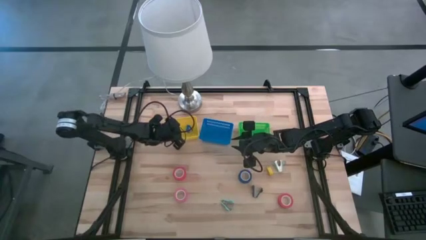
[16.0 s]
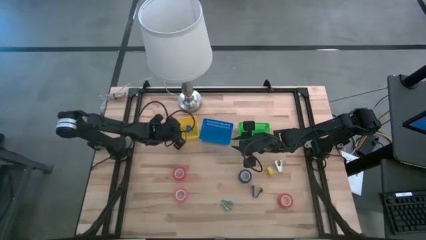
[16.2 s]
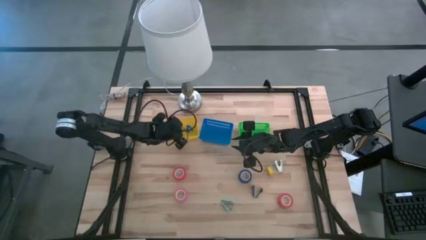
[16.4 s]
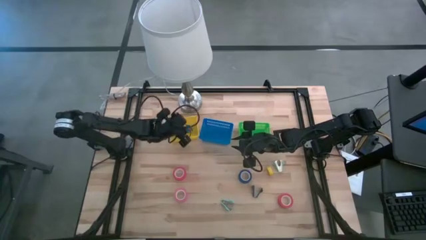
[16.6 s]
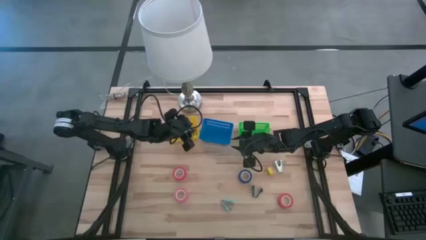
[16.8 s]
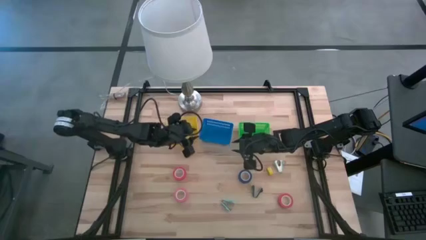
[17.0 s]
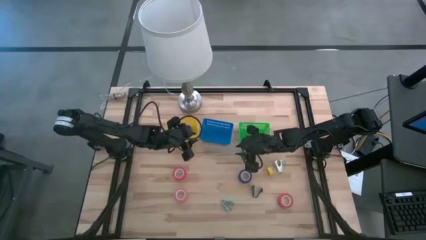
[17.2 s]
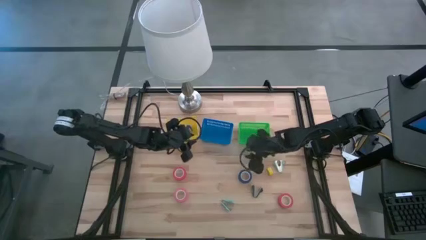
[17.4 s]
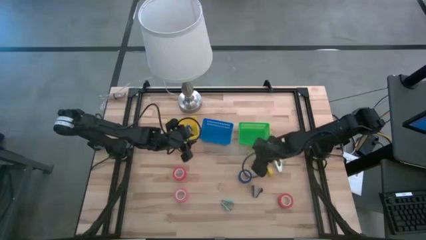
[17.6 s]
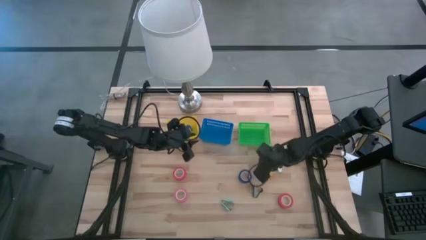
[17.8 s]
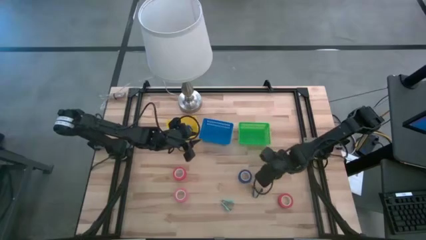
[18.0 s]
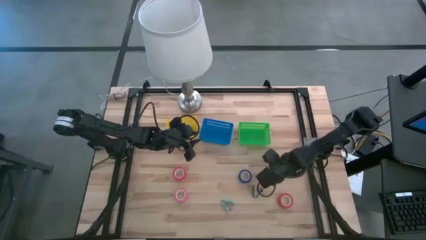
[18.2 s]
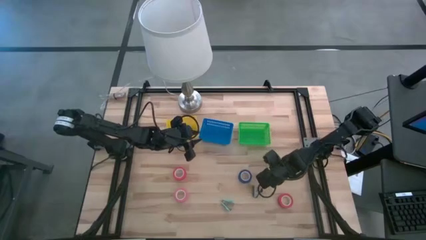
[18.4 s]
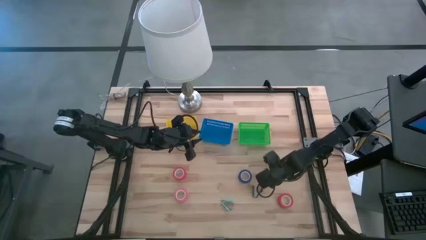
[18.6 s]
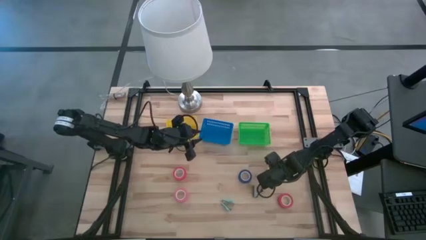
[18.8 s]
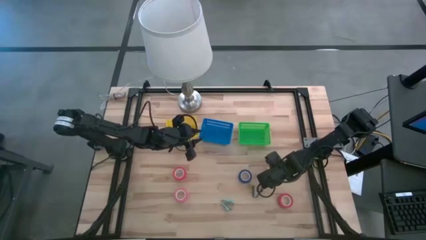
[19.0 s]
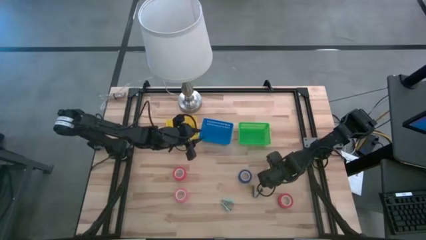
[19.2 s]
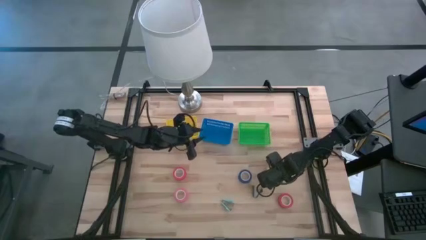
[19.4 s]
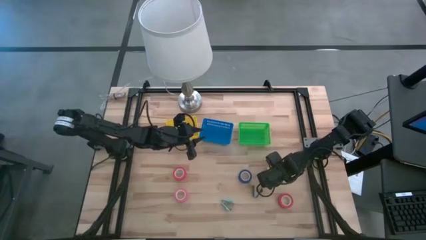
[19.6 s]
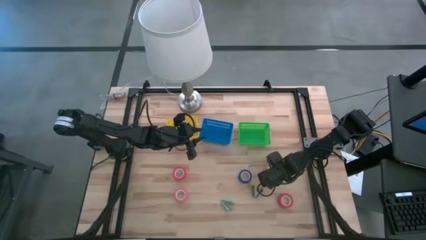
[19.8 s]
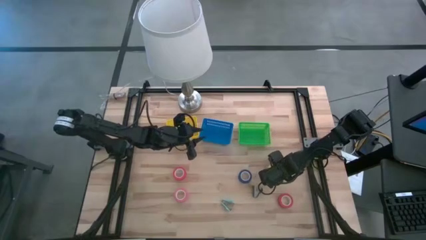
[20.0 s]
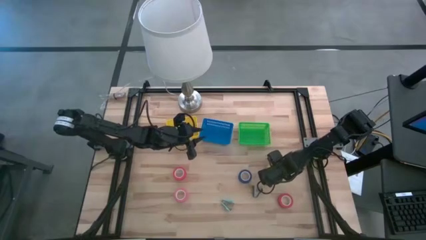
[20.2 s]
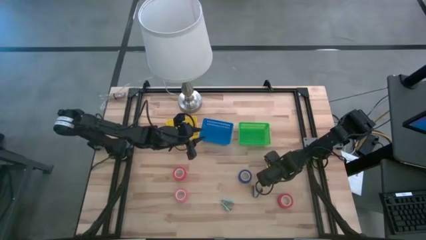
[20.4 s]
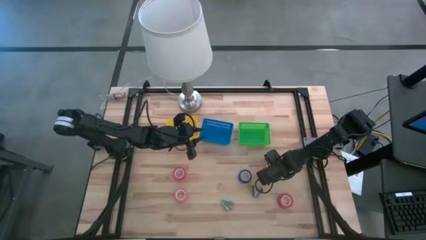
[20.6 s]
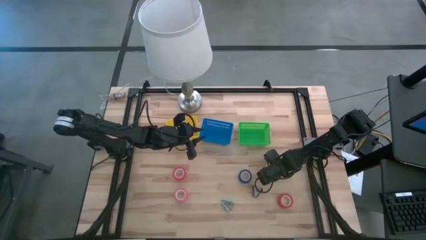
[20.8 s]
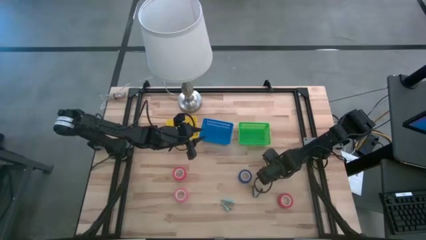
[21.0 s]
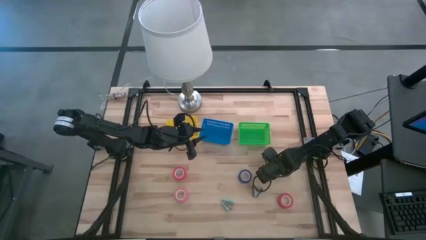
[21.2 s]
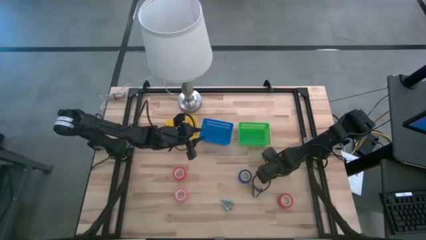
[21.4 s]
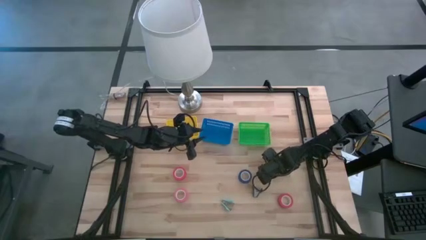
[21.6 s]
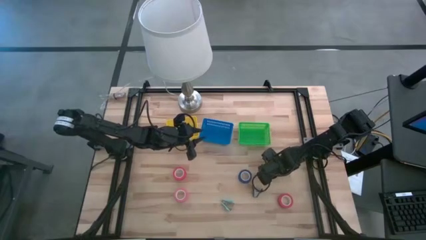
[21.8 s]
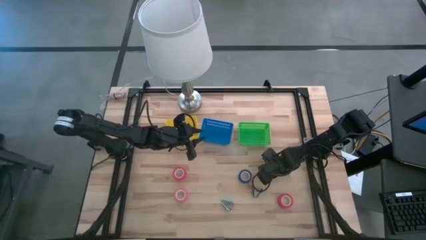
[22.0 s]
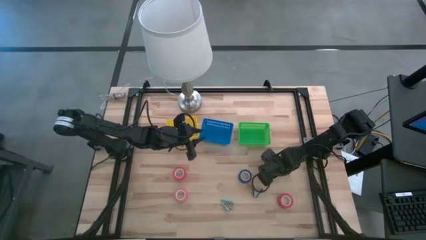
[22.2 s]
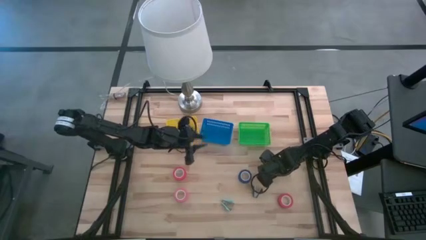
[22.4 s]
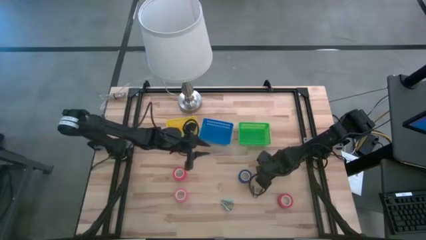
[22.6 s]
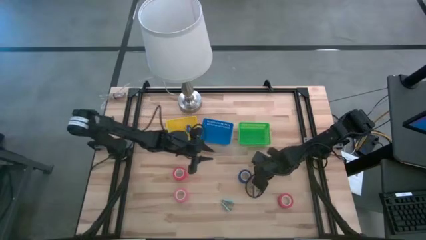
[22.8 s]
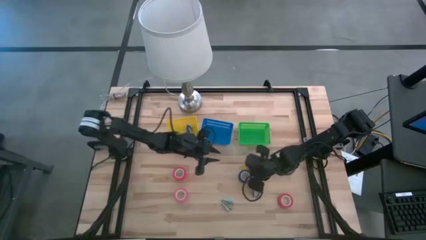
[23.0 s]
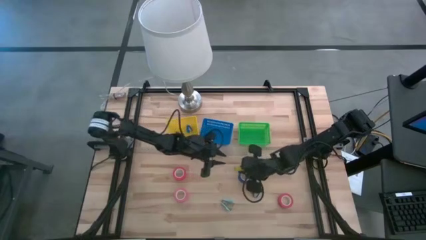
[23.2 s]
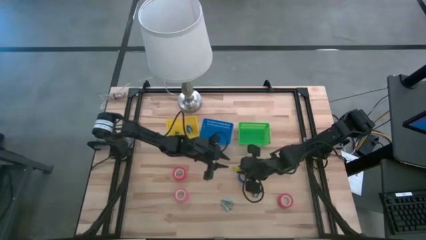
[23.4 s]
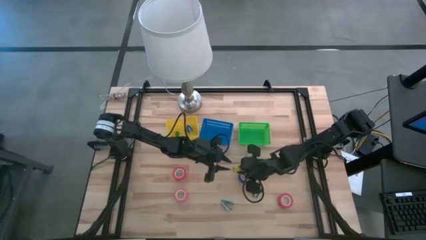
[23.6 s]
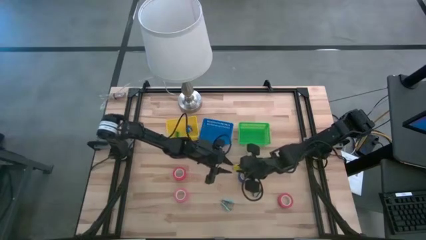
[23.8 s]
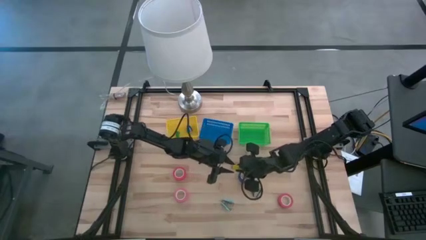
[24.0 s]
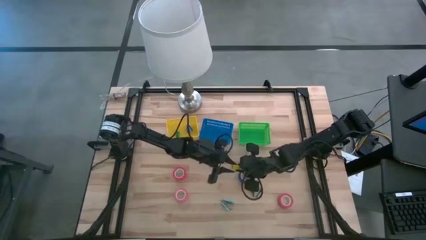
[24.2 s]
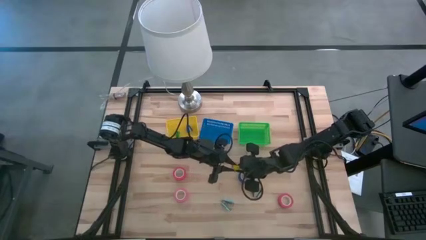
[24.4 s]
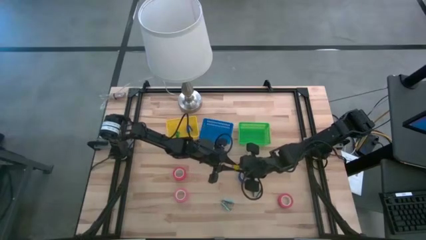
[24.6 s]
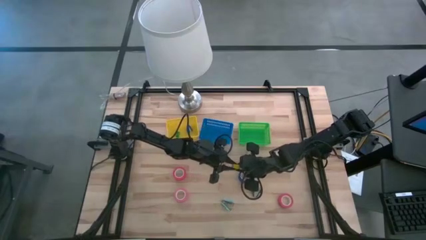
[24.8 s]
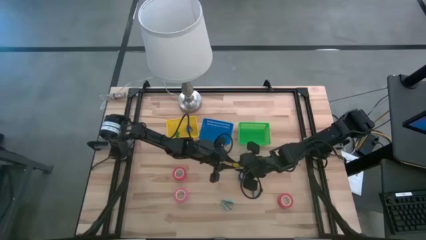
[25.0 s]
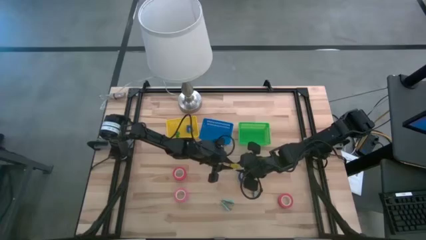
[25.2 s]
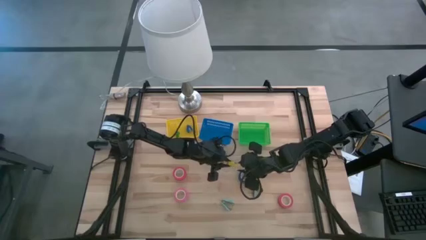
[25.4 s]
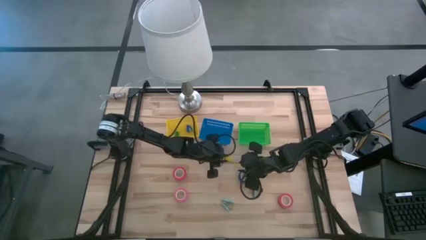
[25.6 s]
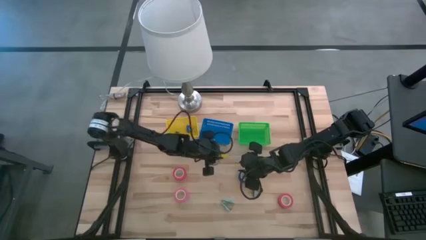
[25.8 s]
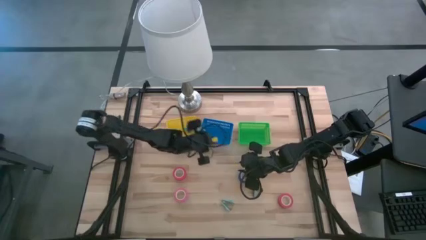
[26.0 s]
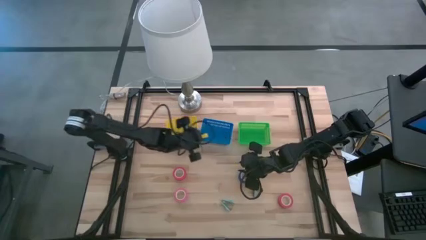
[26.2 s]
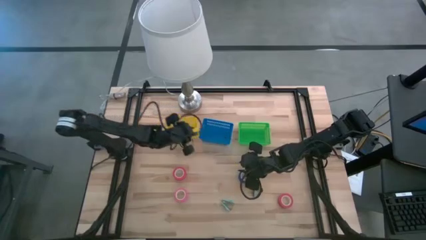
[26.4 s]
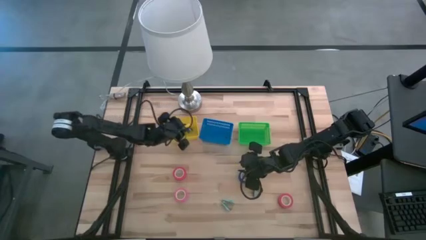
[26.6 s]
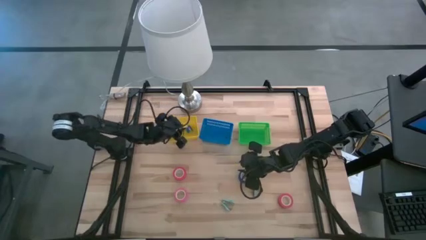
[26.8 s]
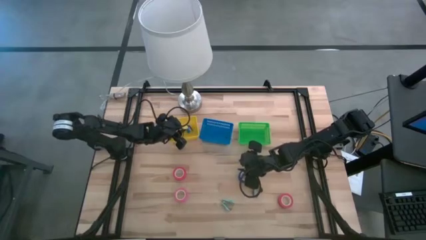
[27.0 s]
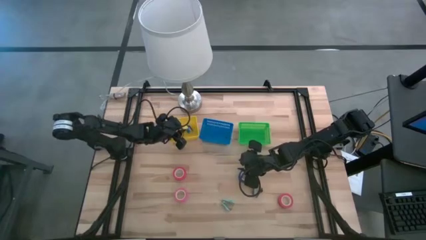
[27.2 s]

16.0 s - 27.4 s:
Task: Pick and place Stapler, Stapler remover, tape
Put the yellow stapler into the yellow bin

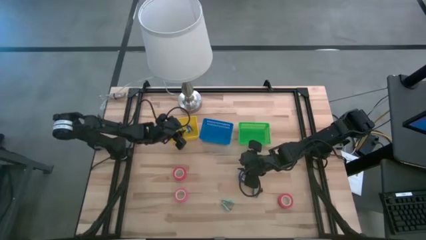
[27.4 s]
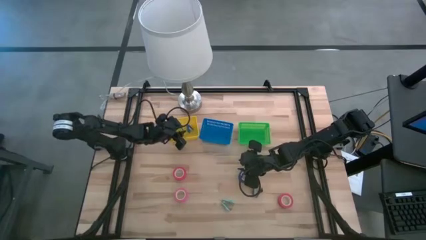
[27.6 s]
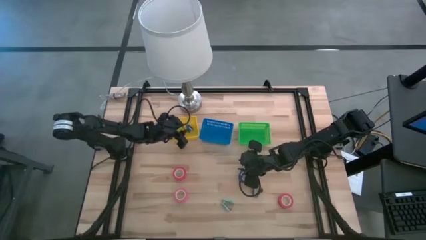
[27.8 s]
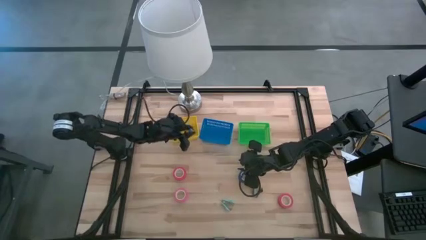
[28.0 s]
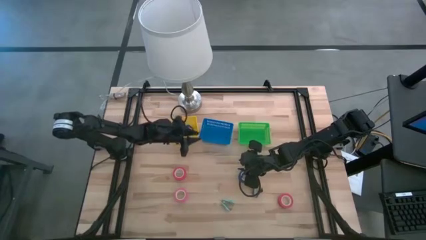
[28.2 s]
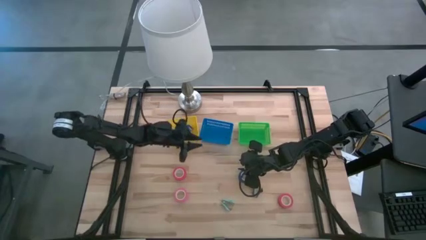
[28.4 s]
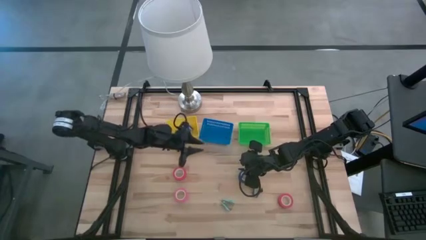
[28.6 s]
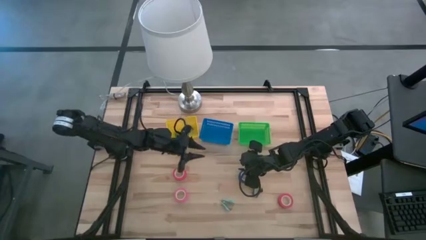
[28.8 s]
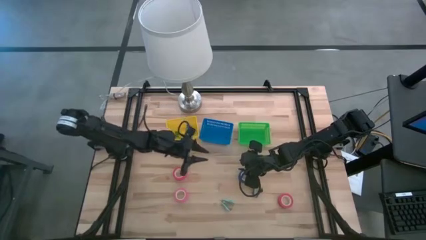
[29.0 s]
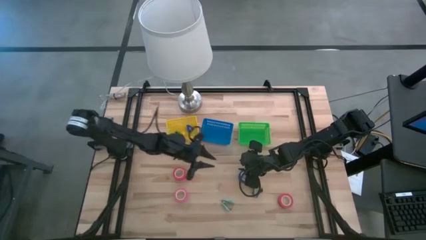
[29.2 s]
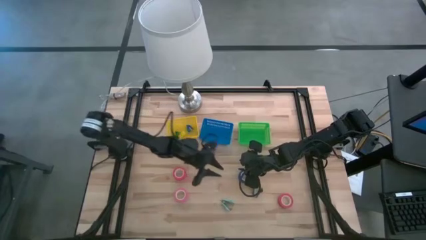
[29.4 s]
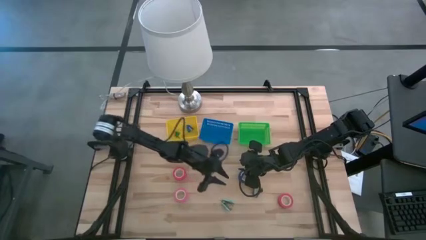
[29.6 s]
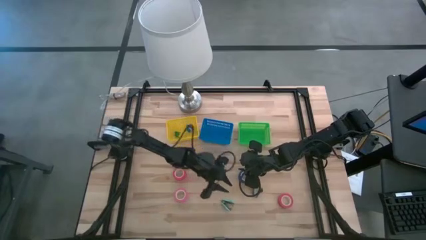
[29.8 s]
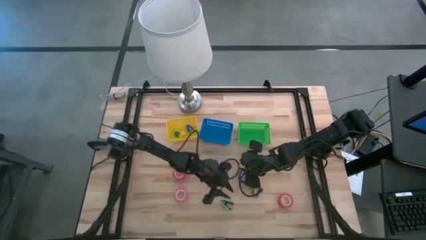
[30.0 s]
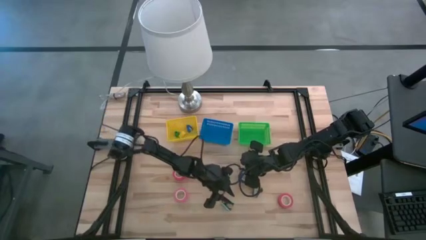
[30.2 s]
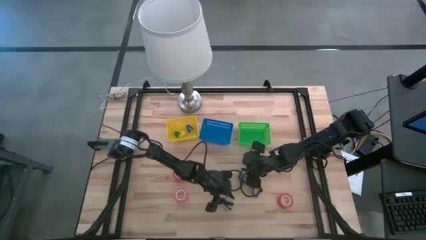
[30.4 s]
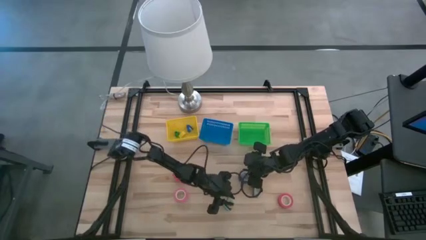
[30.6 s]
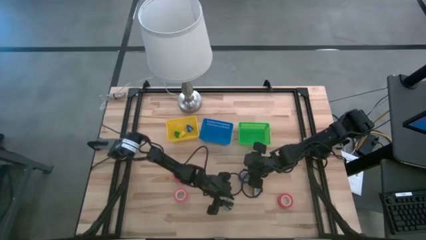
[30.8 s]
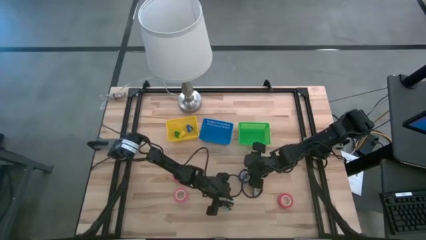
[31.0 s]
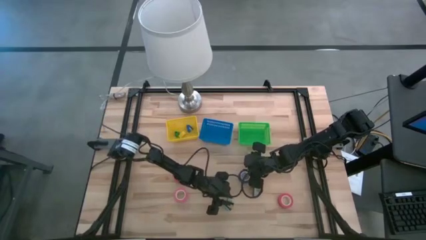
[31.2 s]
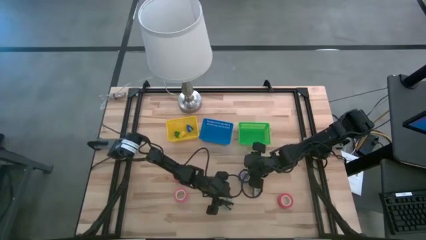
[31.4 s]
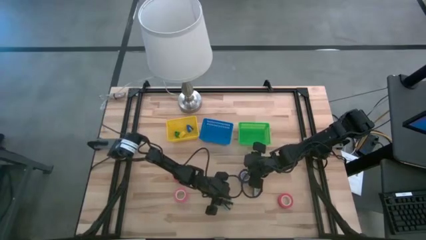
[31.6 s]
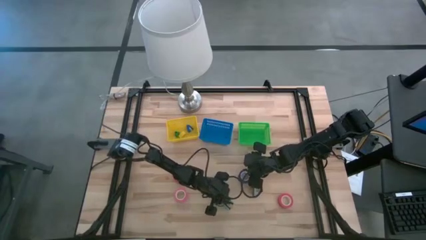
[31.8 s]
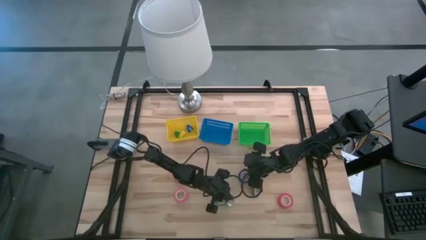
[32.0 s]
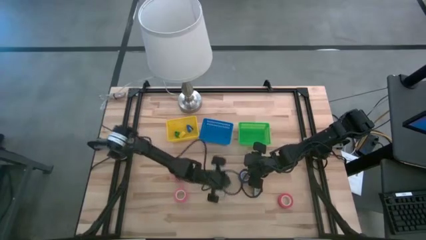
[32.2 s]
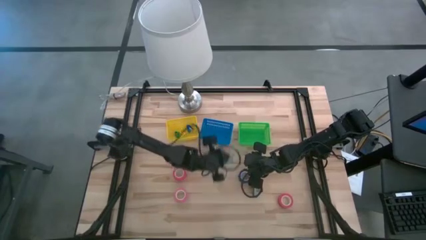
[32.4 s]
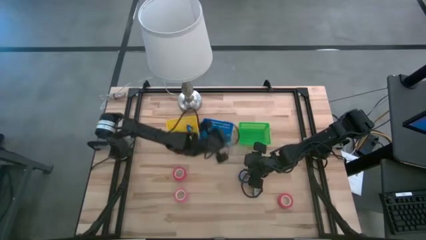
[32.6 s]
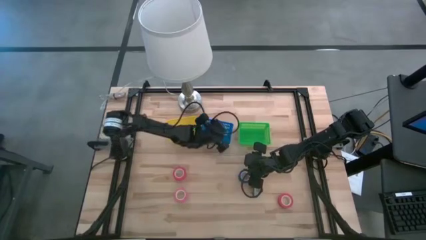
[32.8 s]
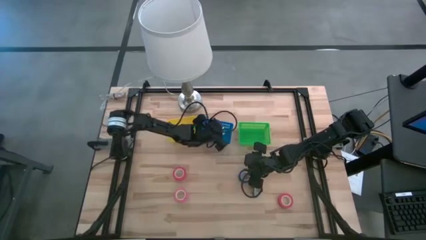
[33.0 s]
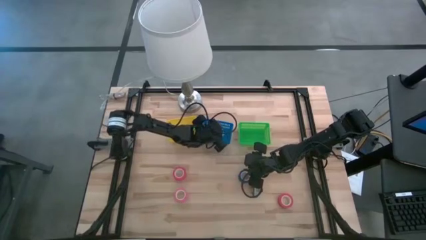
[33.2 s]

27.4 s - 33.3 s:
Put the left blue staple remover into the blue bin
